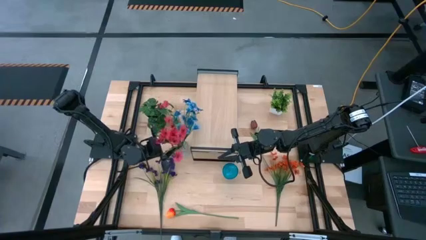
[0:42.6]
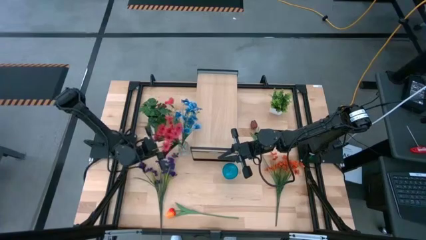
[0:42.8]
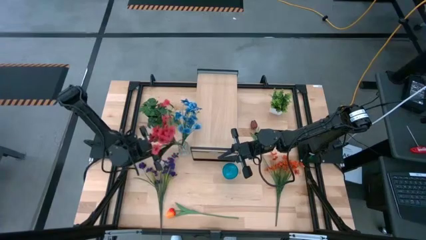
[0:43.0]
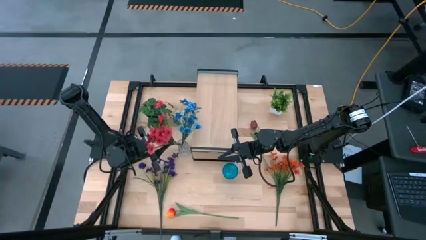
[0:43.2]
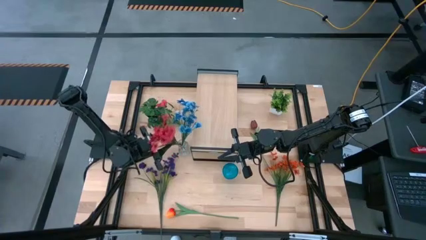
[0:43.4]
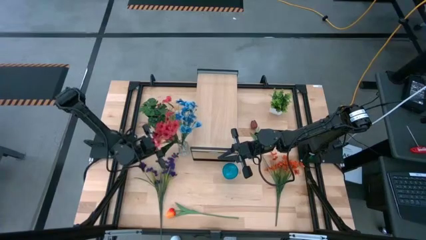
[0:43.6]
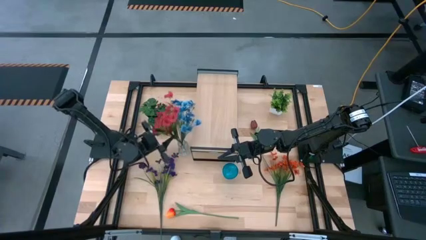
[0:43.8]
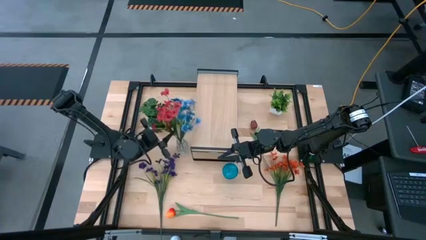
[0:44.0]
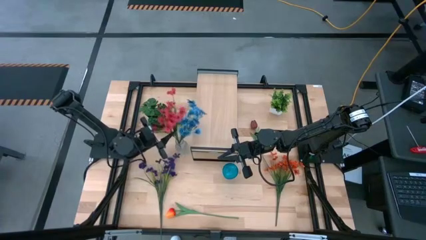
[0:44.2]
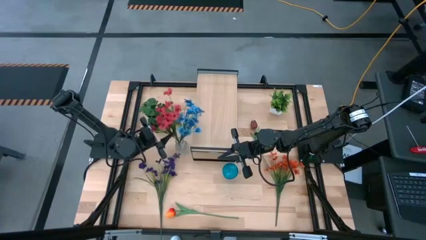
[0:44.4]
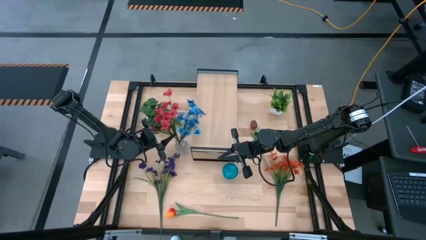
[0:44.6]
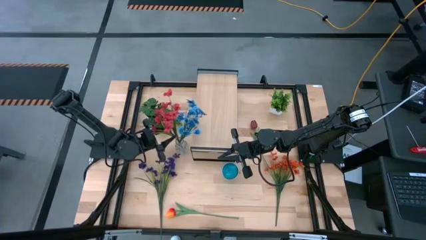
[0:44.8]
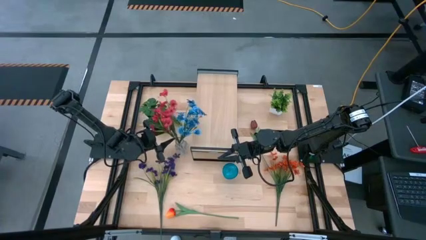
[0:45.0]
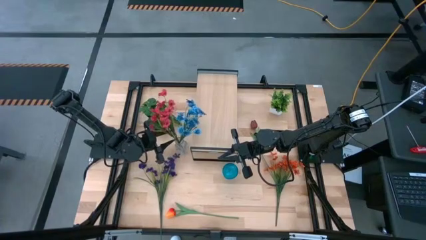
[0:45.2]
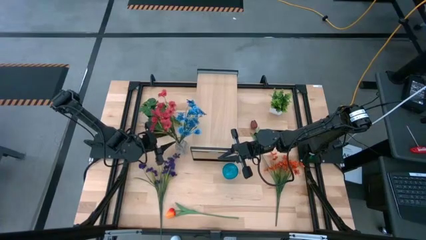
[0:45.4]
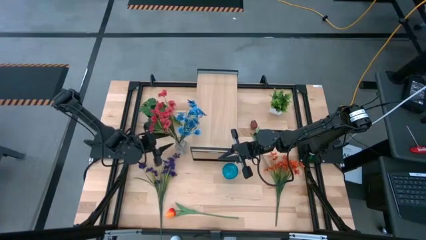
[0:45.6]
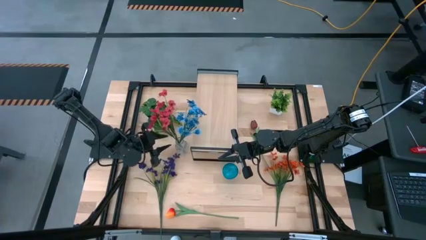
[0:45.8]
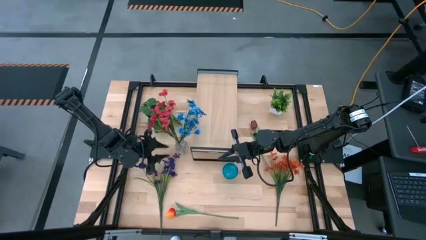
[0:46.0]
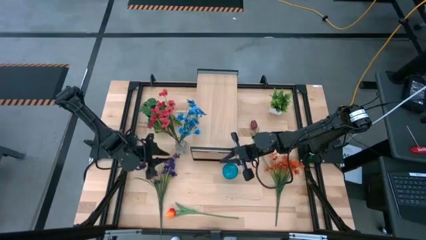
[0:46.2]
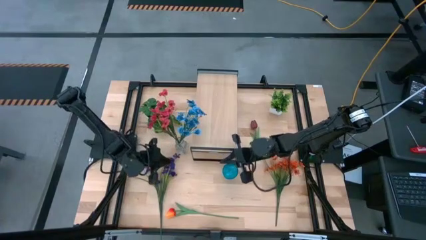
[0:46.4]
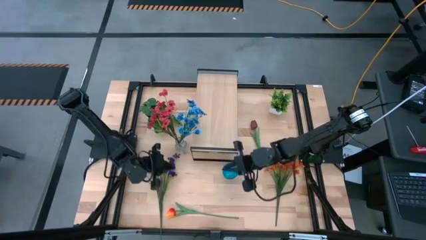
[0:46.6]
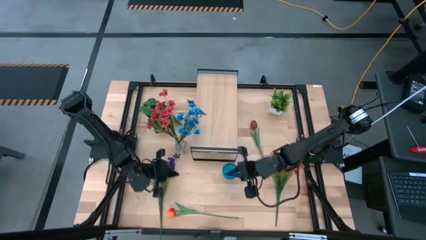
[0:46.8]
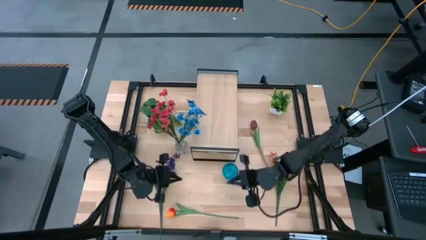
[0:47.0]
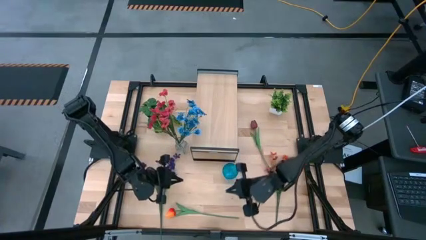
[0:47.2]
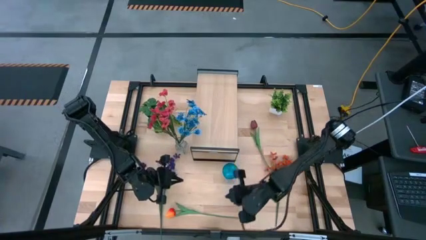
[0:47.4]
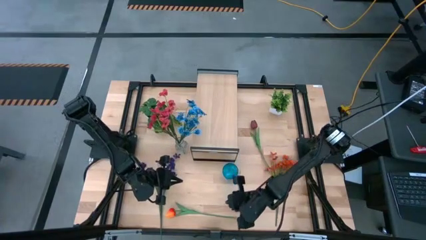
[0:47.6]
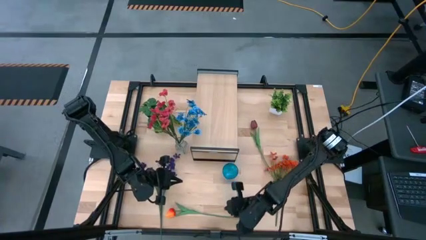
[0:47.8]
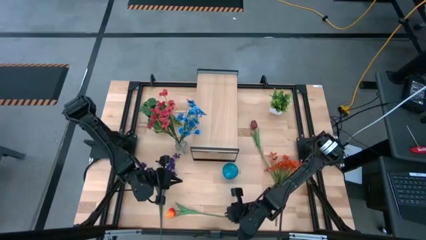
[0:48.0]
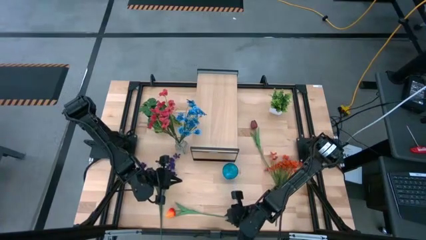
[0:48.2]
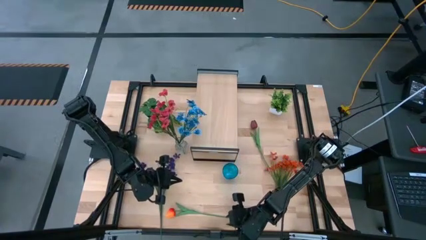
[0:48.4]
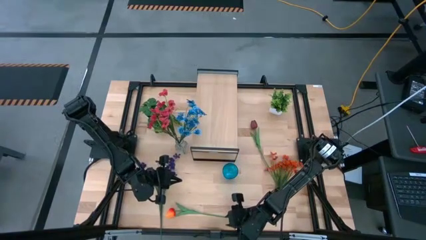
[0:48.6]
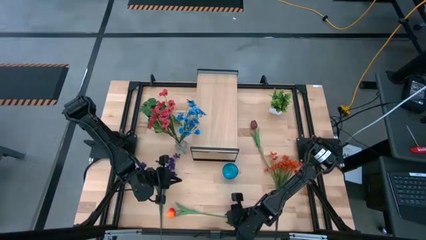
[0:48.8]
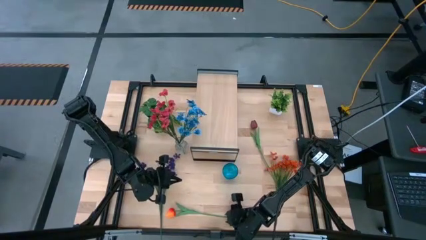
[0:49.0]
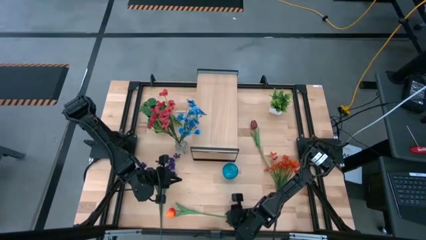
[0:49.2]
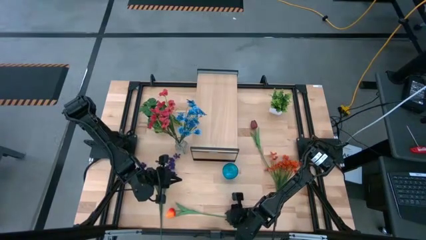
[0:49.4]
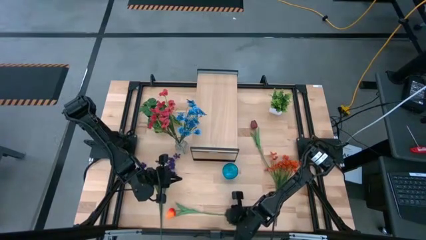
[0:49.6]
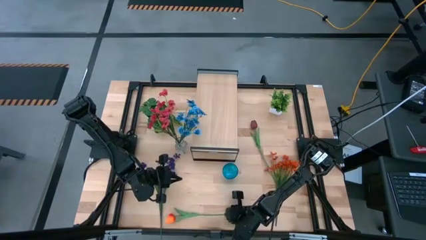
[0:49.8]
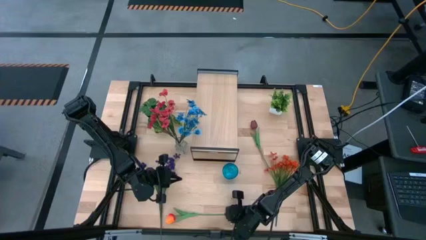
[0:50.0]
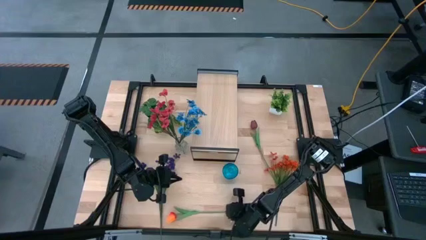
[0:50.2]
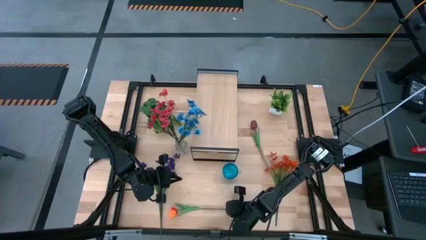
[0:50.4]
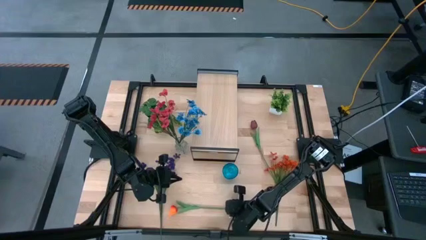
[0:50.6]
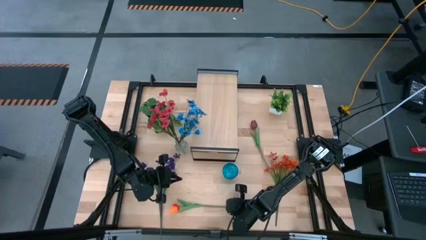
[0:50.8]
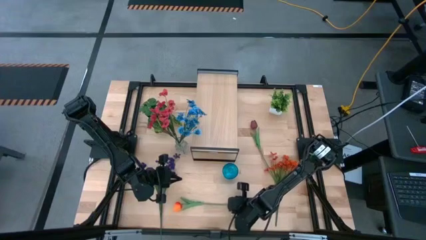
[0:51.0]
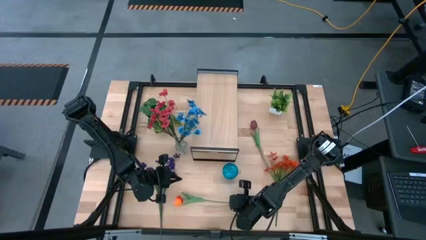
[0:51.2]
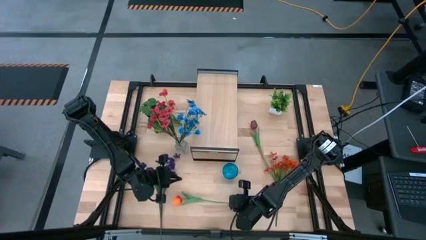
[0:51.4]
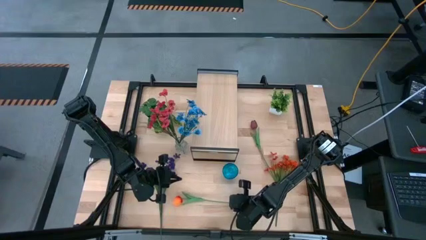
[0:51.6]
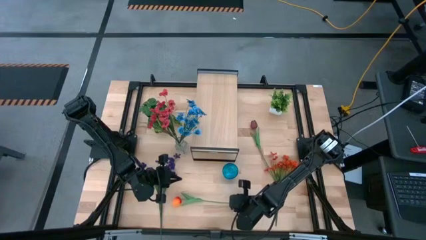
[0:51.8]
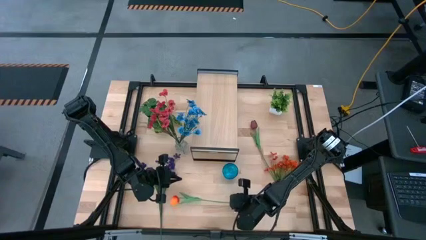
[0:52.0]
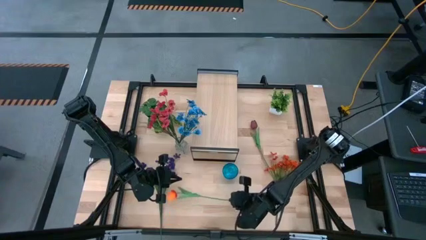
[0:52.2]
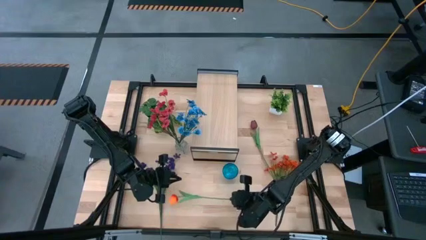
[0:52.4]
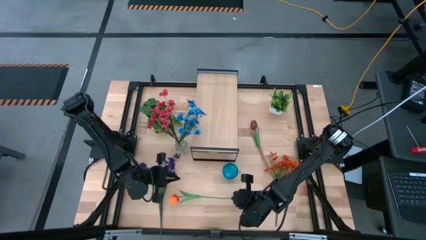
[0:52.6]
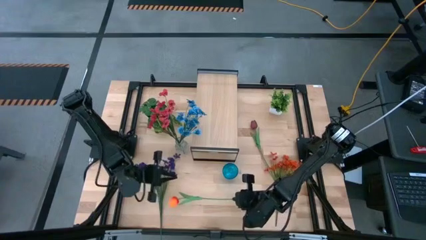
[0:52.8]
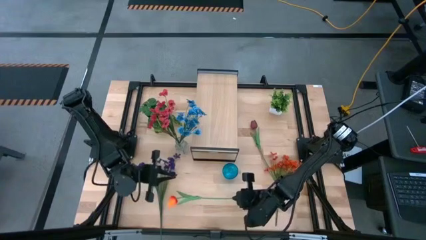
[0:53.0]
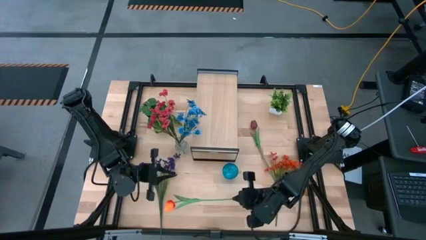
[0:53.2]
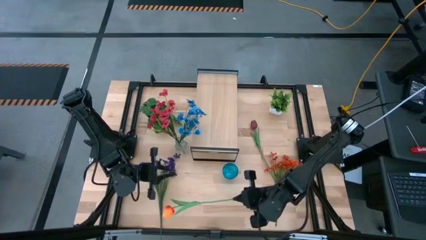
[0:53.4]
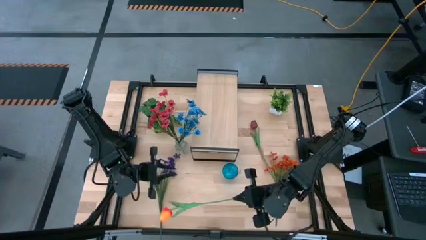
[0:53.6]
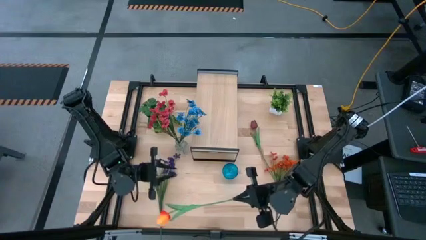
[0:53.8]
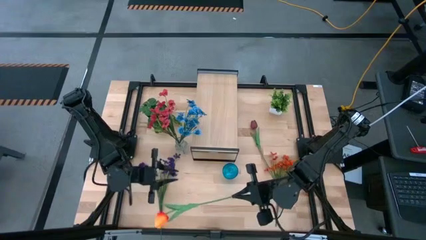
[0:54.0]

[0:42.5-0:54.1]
Task: Pick and place flowers into a vace then onto a shelf
Put the orange tulip into the transparent vase

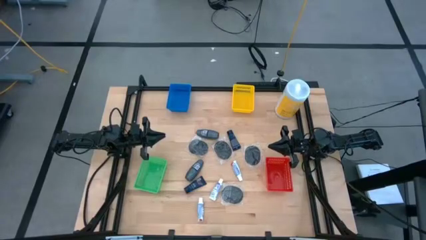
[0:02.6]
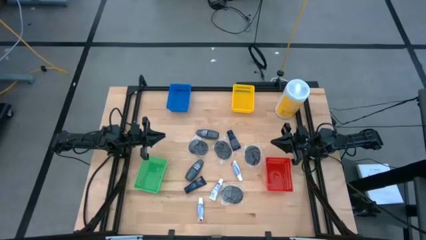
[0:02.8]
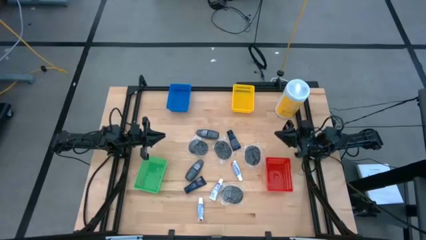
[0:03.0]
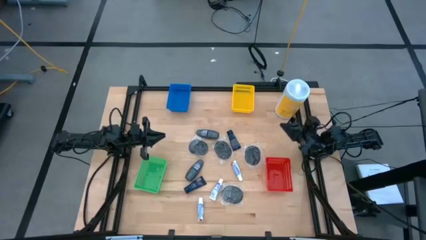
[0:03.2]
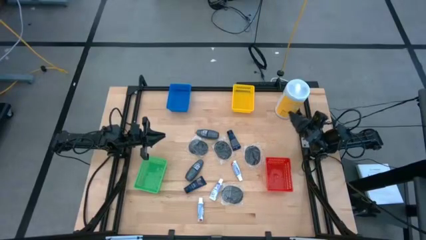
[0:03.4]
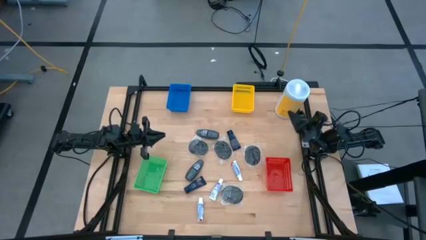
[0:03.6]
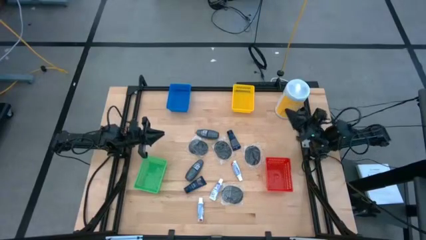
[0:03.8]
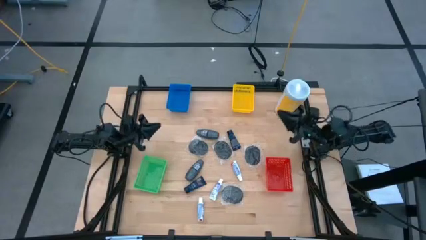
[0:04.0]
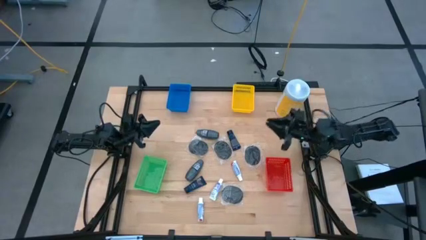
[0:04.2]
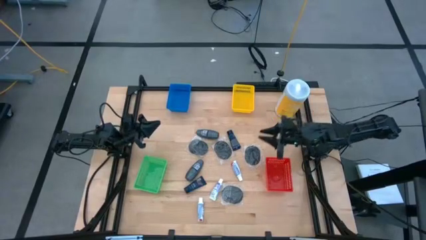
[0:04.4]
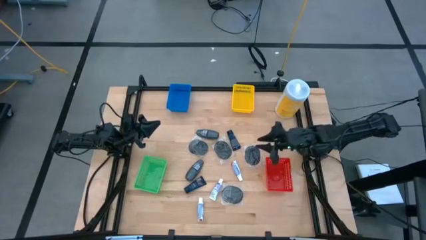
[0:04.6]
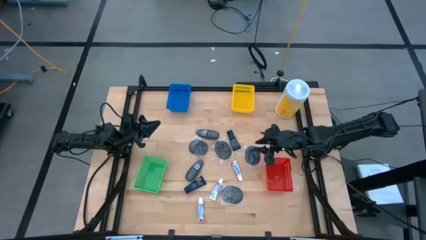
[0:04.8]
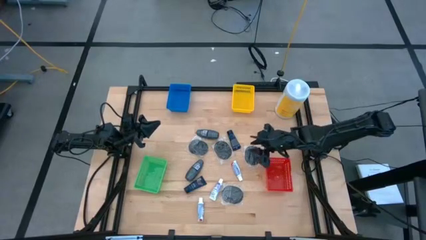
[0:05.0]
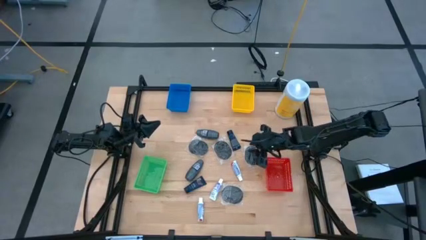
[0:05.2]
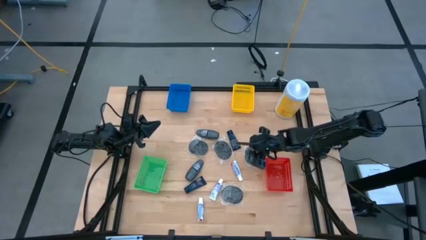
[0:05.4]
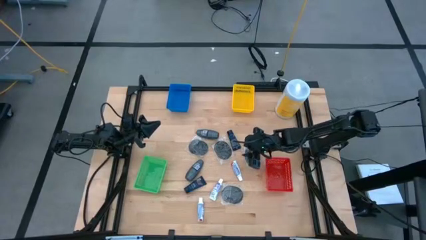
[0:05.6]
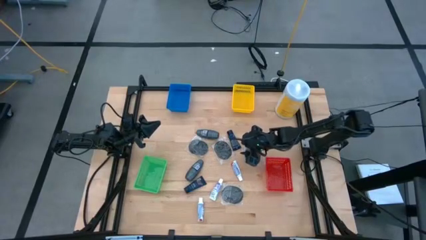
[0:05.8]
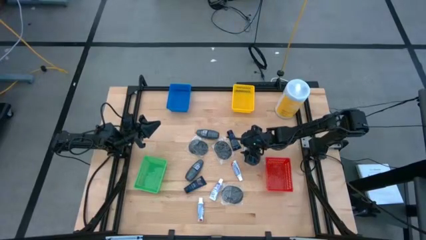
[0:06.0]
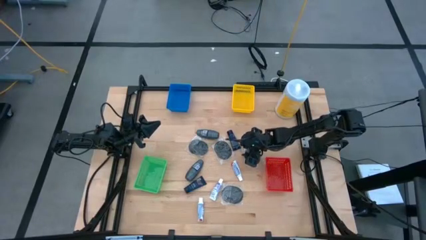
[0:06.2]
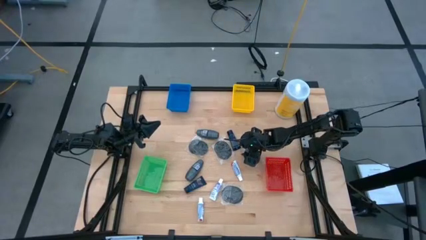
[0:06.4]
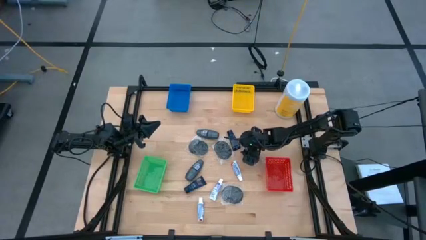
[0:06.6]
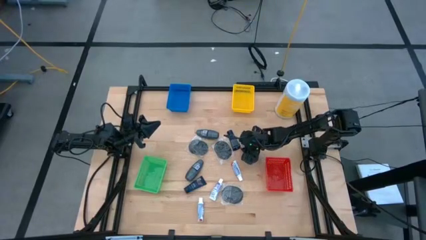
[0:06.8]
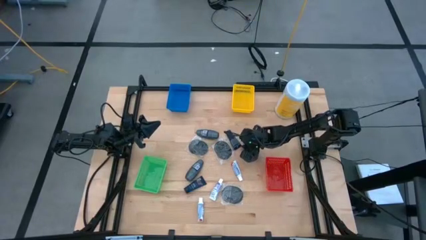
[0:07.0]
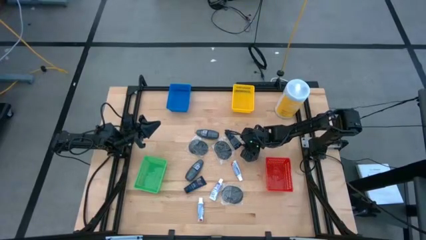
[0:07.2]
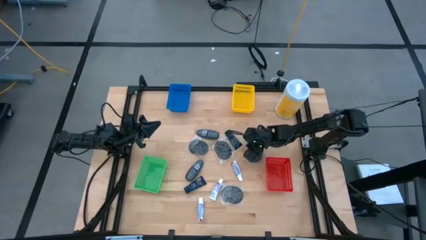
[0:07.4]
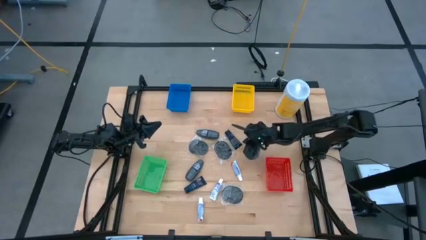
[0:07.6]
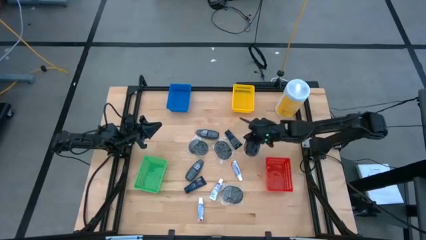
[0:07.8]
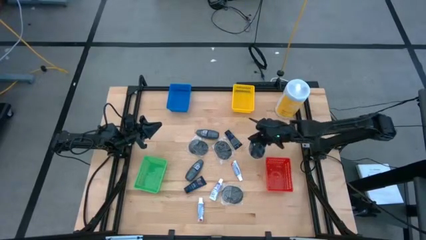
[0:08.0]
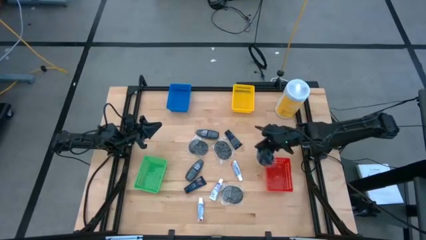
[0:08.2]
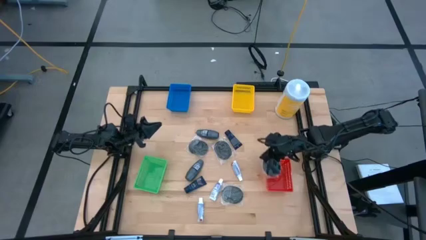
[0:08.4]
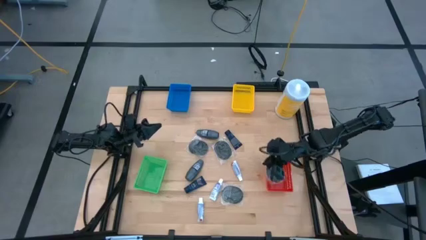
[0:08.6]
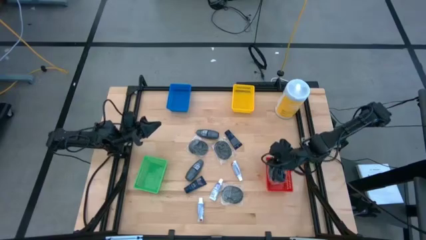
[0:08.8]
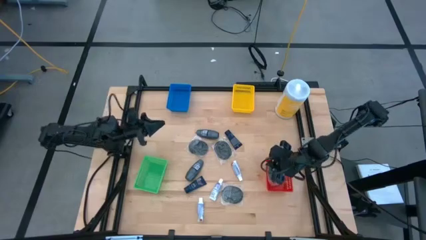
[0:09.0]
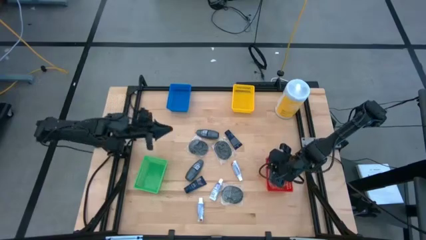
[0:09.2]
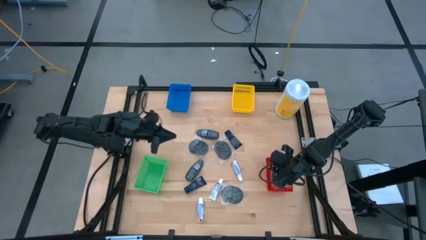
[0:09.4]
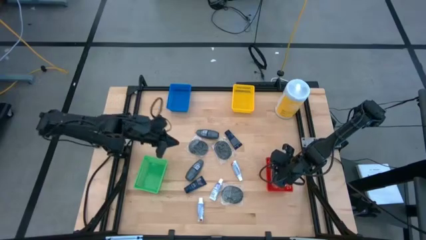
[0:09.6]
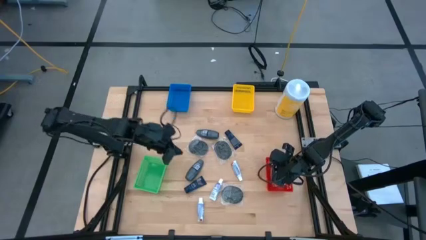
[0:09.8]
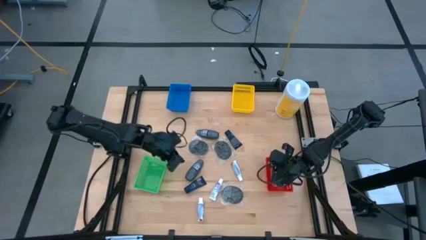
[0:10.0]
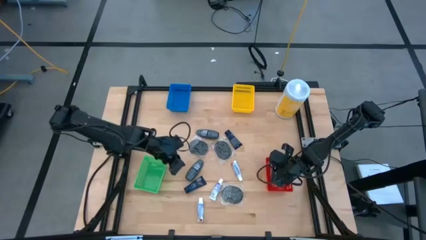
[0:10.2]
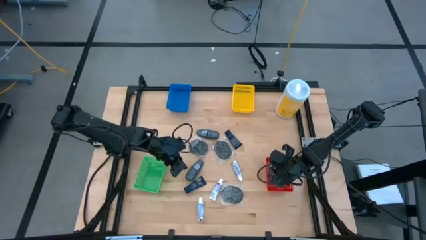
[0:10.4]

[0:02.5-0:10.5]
Task: Pick & Place Travel size toiletries
Put the hairbrush into the red basket
